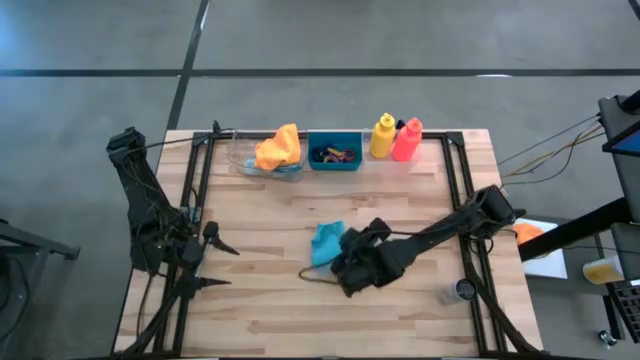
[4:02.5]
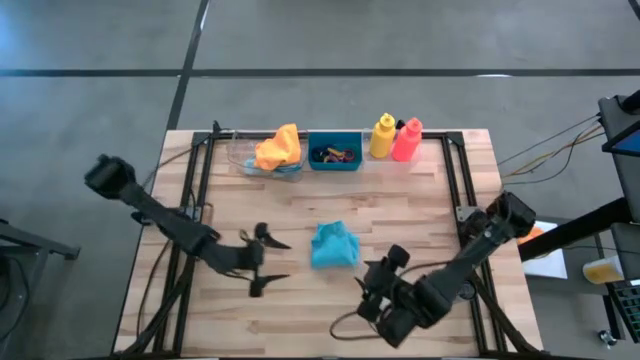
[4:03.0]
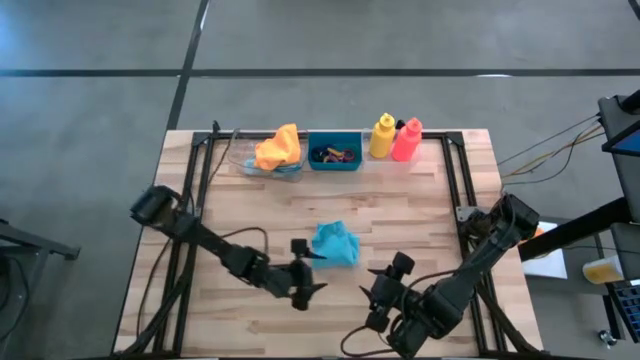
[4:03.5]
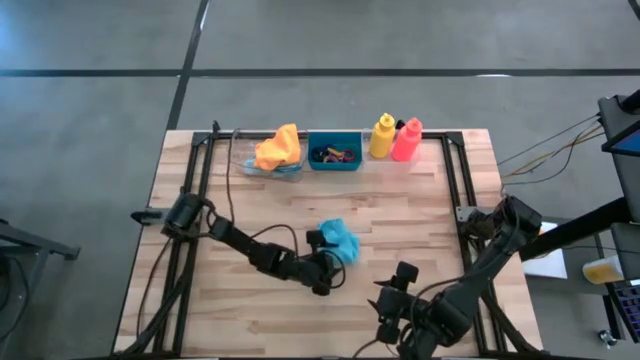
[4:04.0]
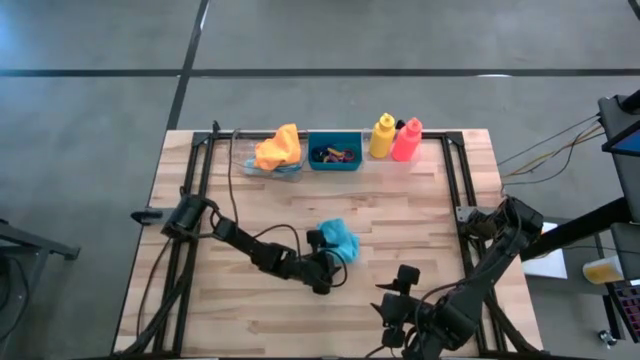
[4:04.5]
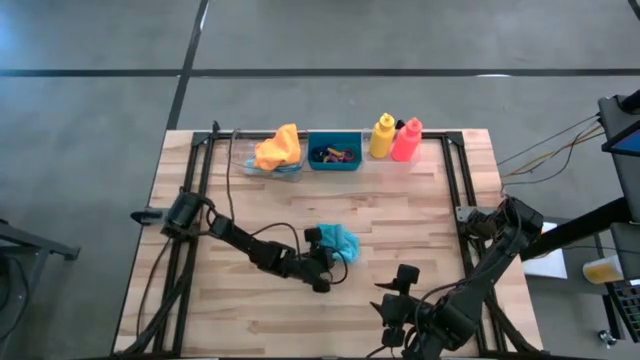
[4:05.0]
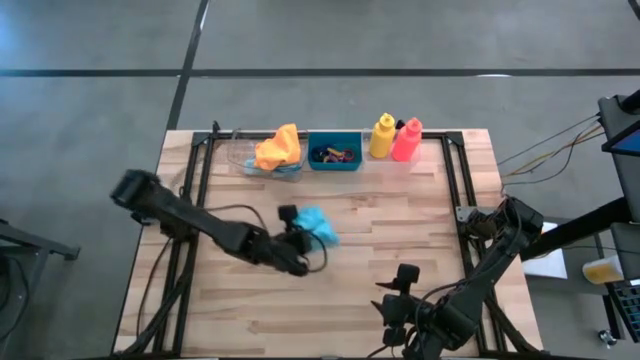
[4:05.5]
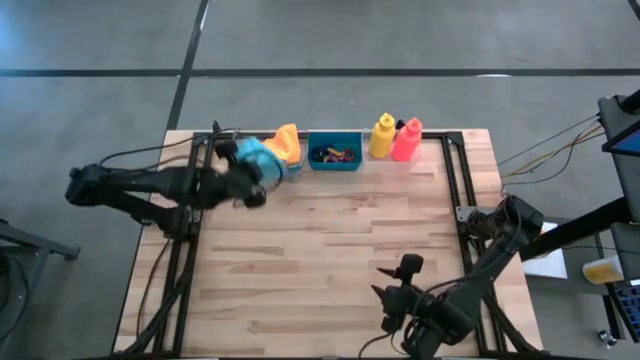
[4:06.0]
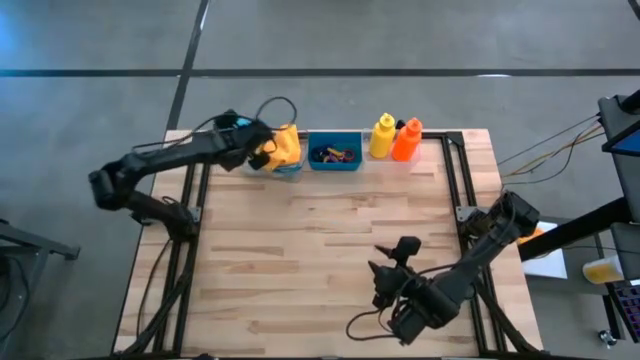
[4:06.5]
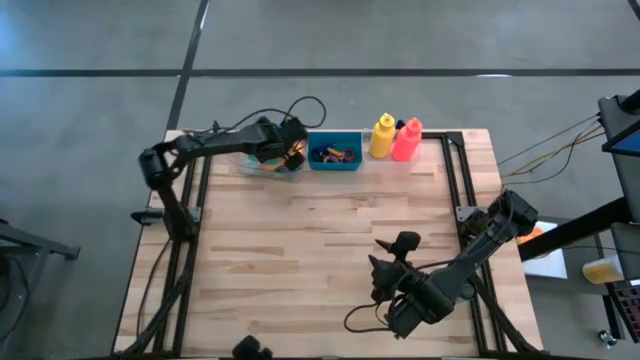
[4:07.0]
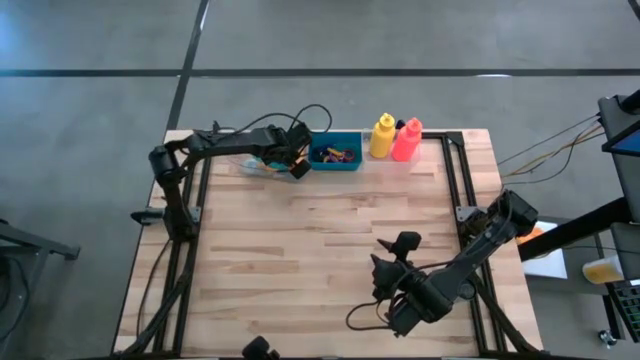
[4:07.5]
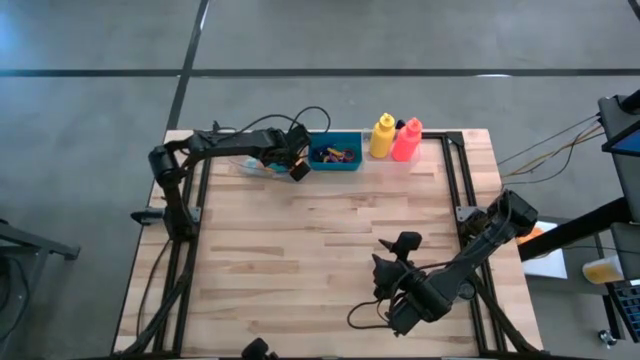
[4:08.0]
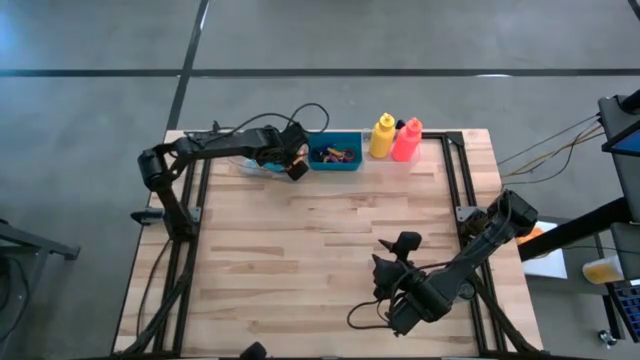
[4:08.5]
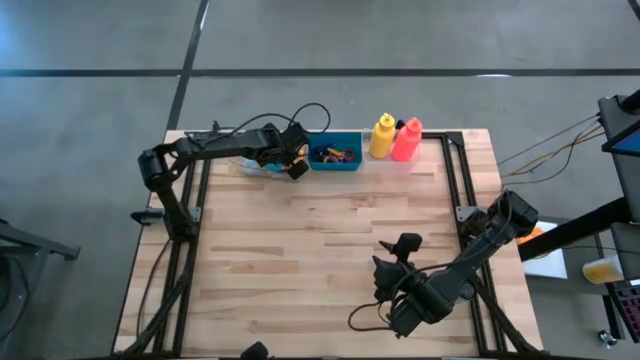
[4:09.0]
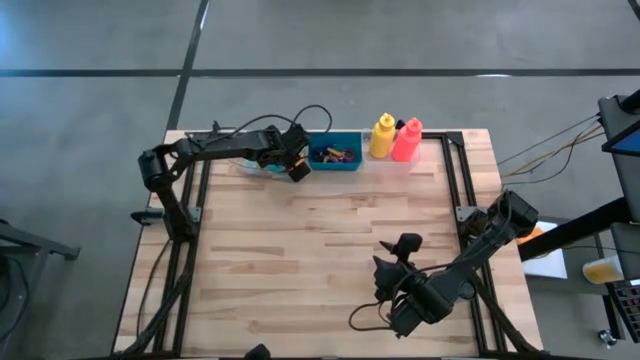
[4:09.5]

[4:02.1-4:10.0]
Task: Pick & Place Sports Items
Put the folded blue towel into the transparent bin

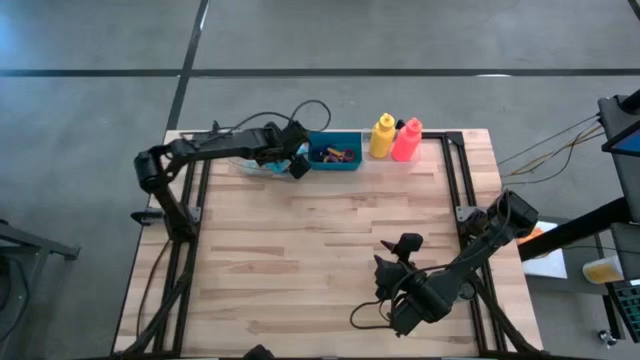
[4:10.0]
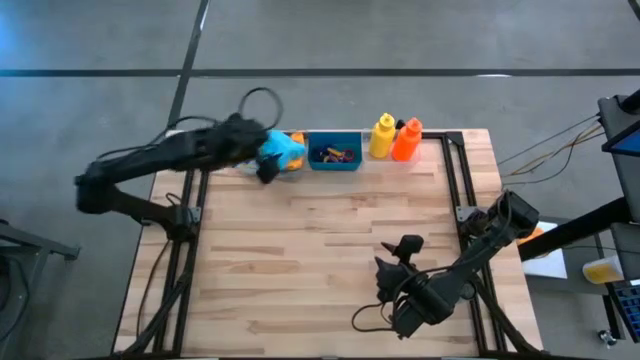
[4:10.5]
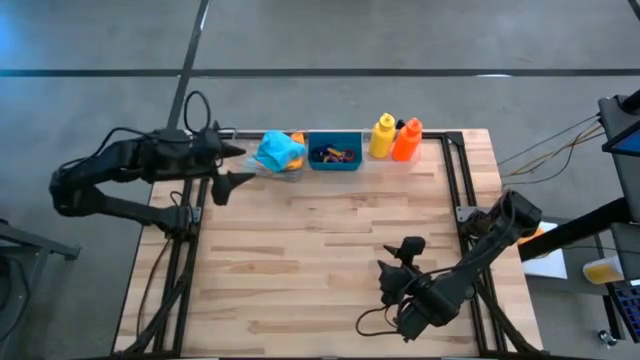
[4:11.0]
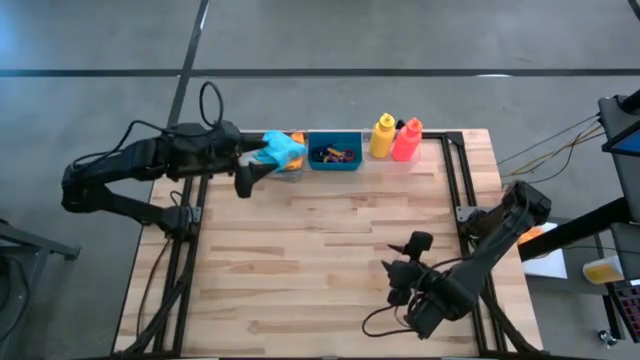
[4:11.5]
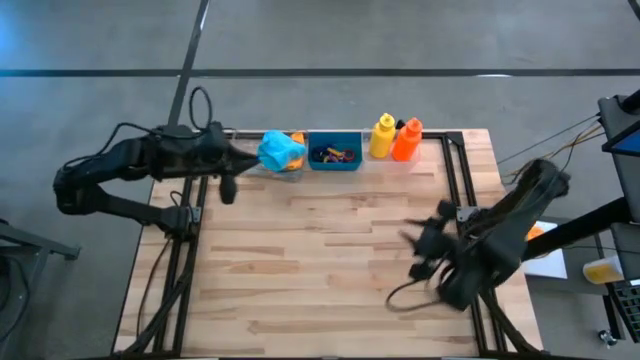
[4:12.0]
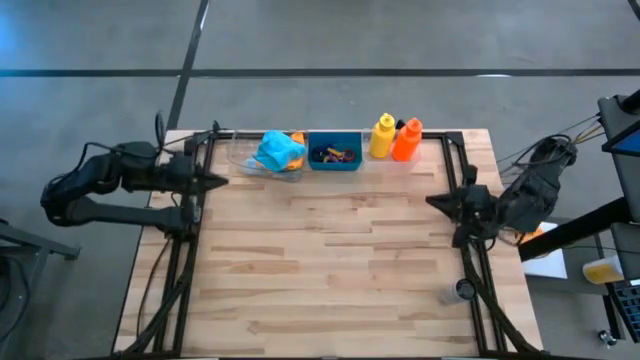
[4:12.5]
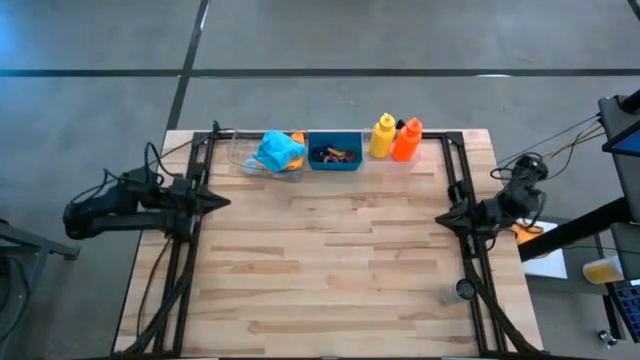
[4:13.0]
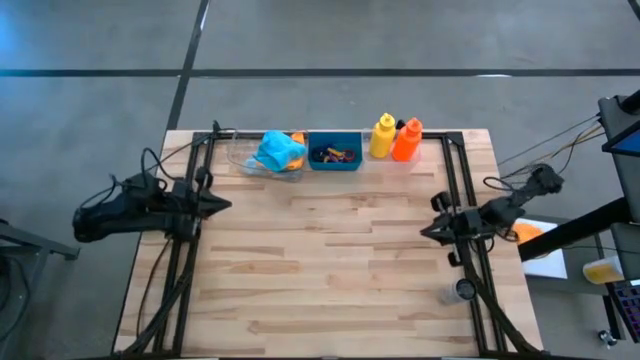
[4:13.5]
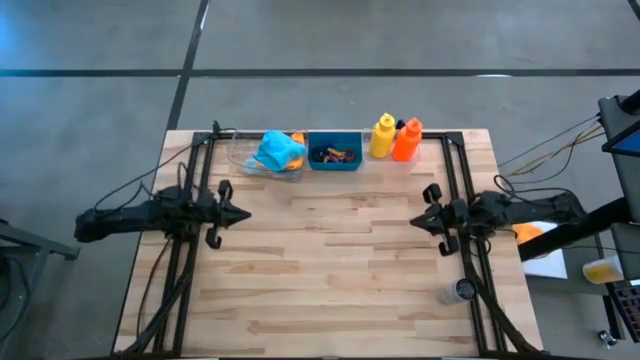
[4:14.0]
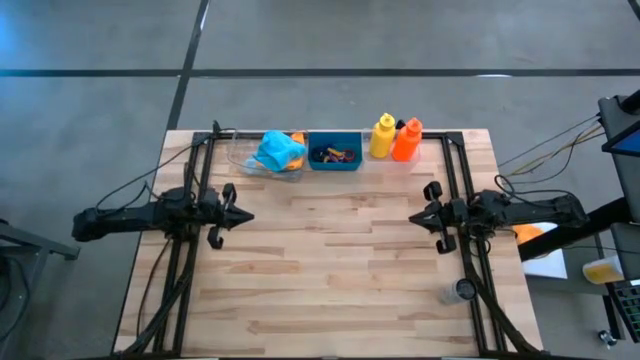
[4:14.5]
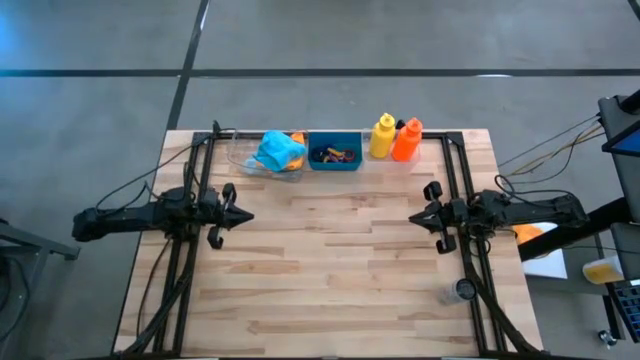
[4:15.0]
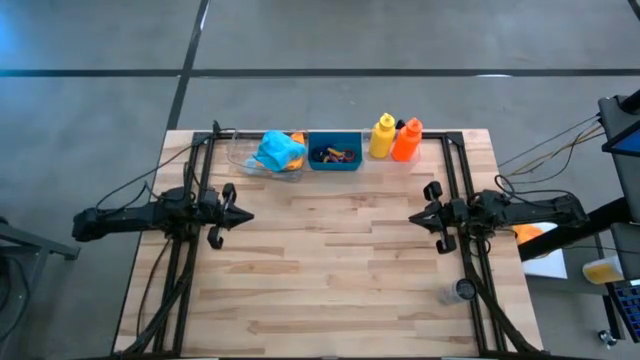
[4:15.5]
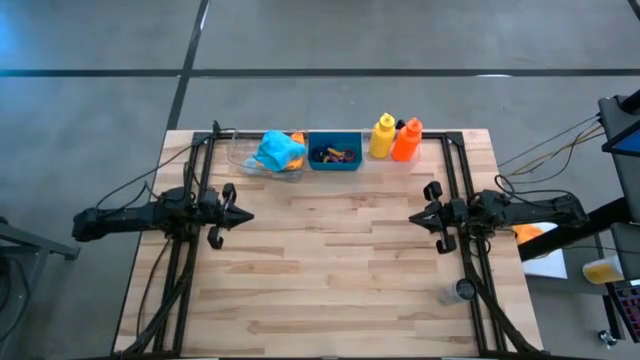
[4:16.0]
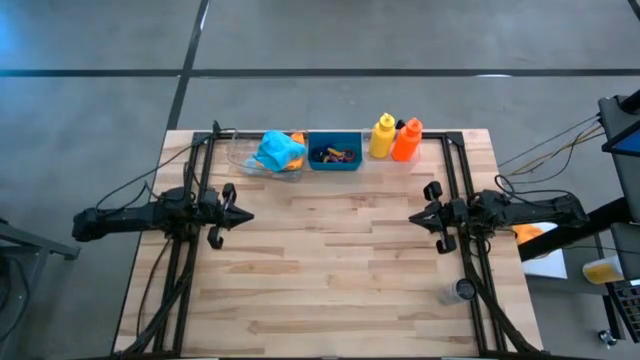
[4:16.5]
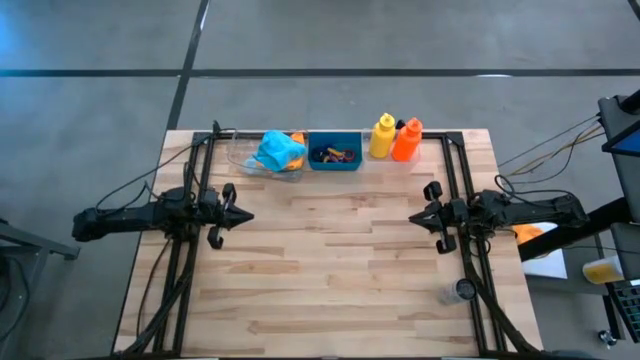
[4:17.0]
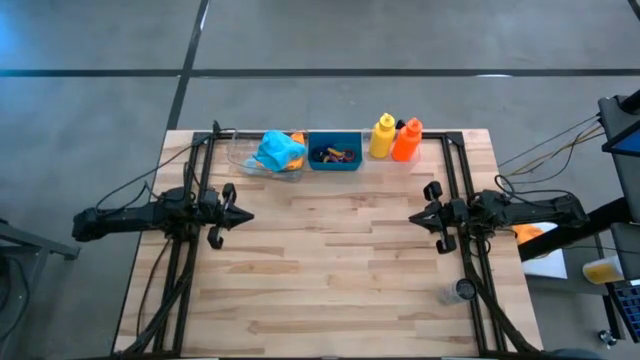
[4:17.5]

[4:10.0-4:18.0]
Return to Home Position

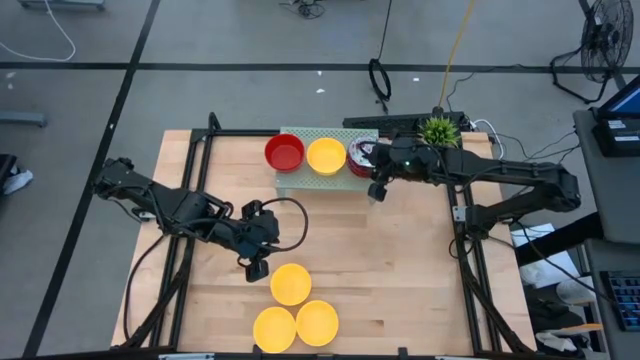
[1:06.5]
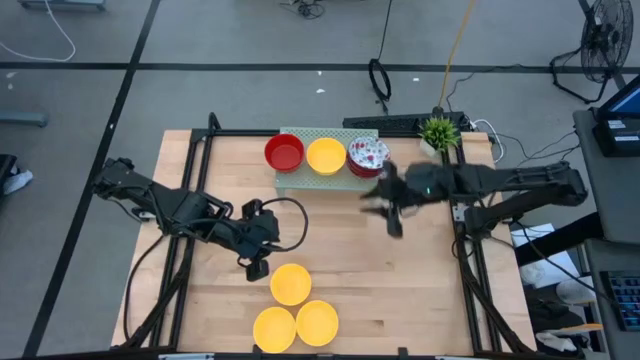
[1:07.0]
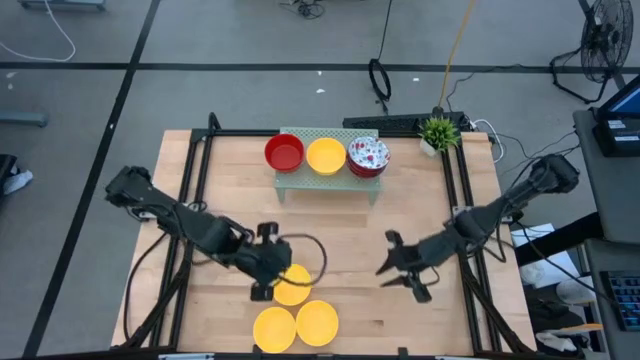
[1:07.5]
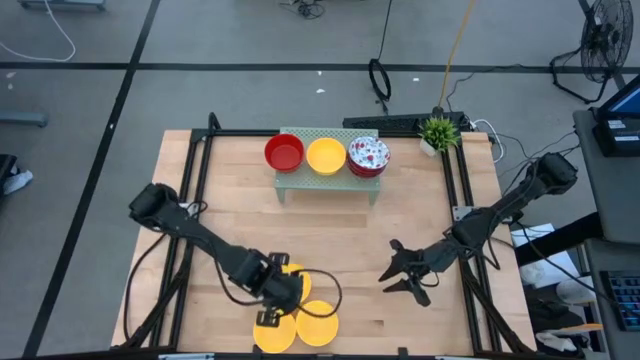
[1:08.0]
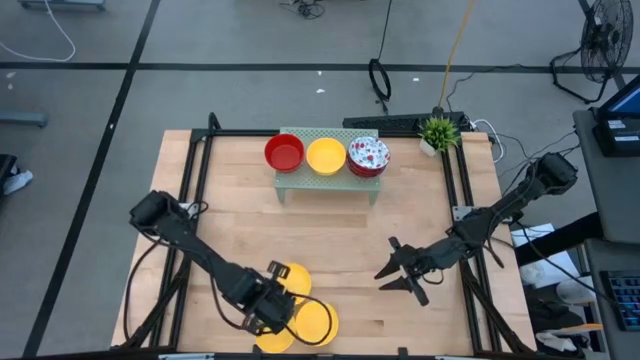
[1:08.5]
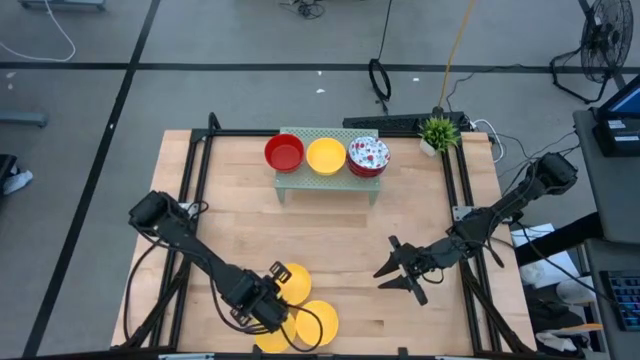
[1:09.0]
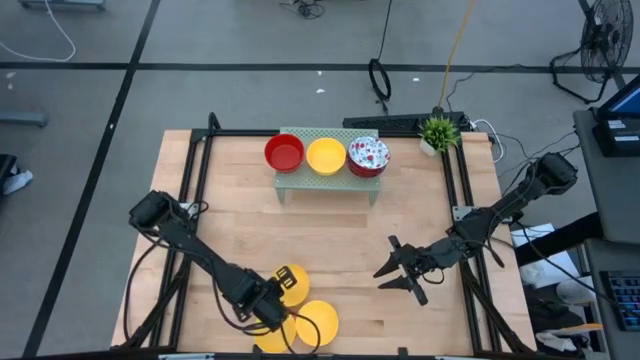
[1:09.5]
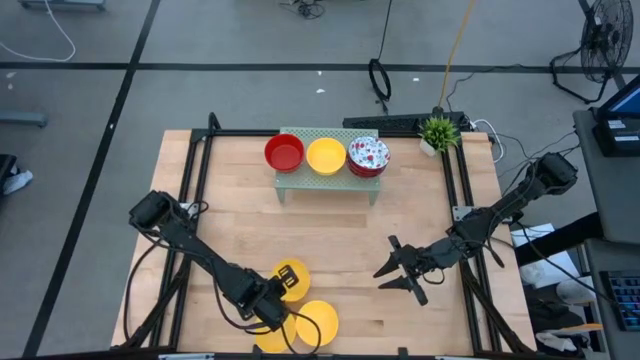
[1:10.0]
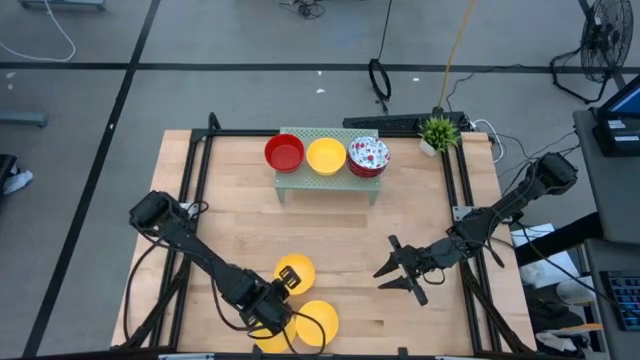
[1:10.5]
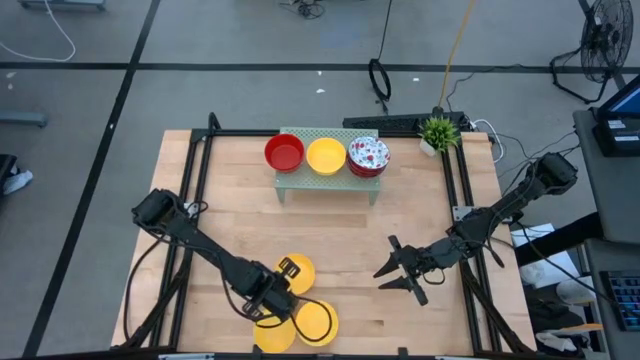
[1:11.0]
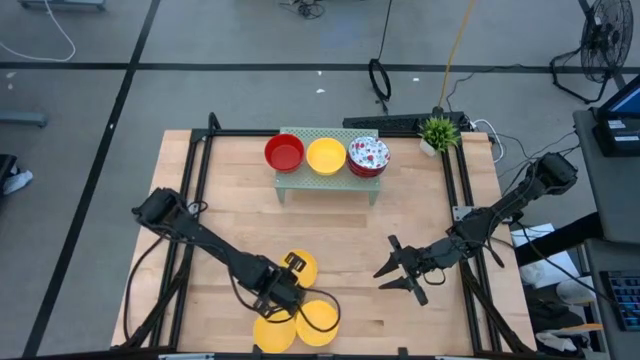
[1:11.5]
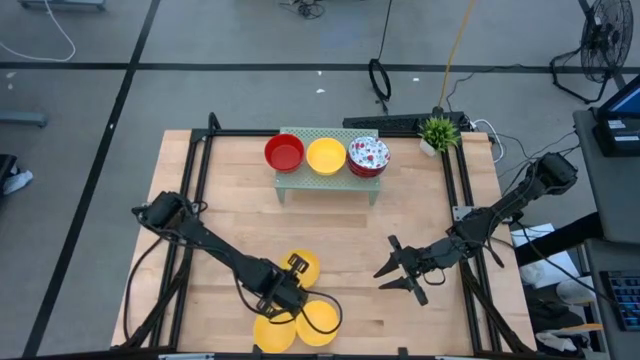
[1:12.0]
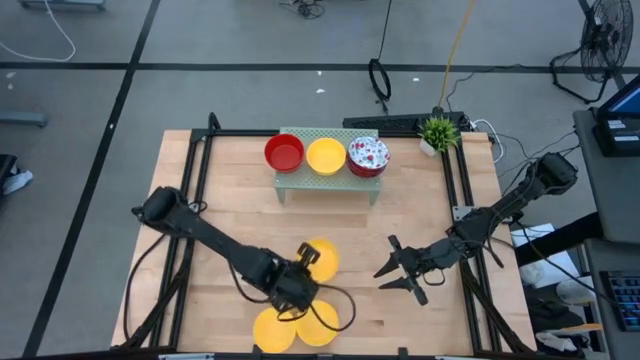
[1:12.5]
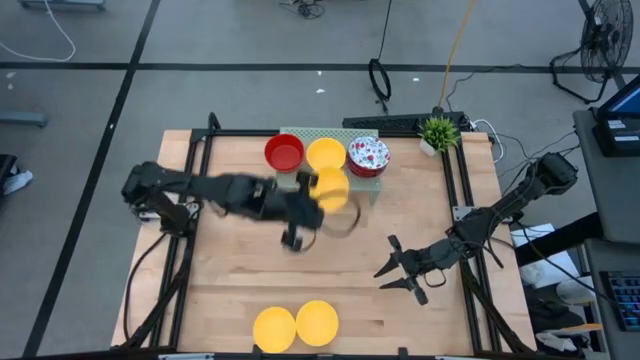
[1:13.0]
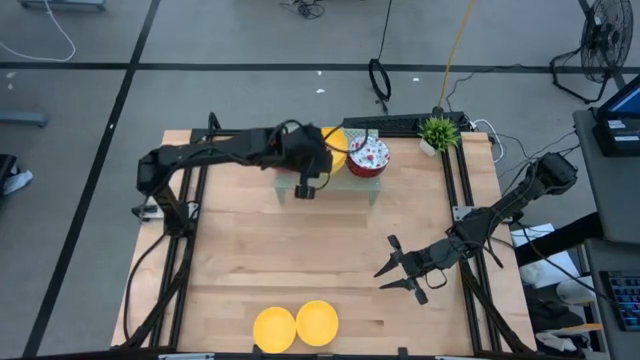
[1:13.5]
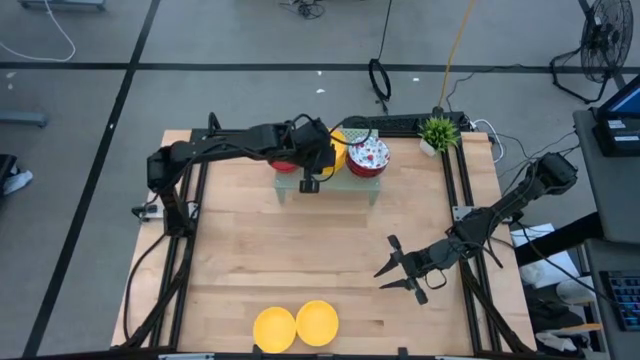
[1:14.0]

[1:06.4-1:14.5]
Task: Pick & Place Mini bowls
Stack the yellow bowl on the yellow bowl on the shelf
